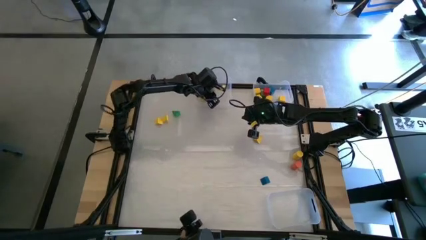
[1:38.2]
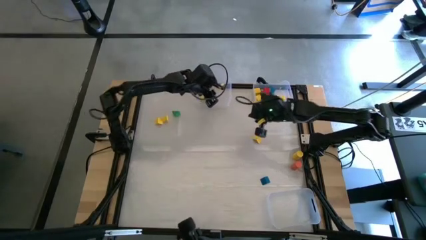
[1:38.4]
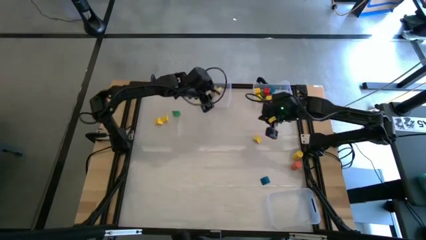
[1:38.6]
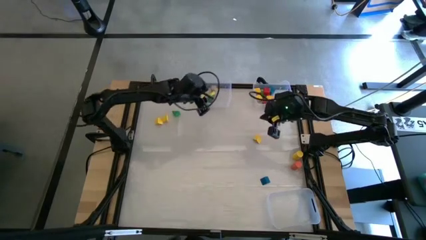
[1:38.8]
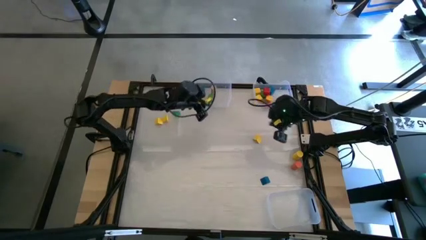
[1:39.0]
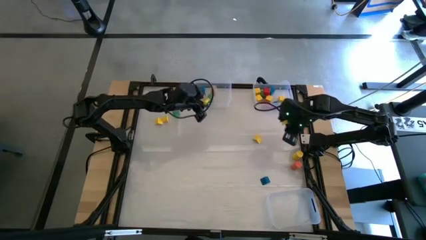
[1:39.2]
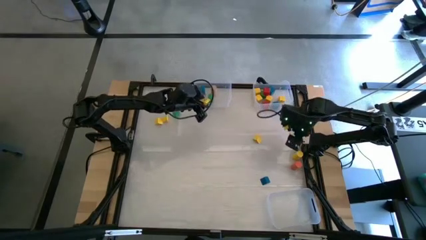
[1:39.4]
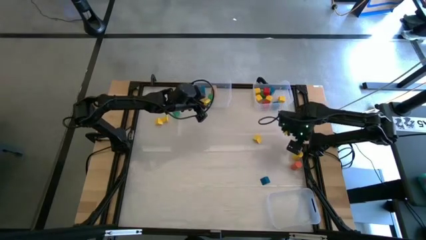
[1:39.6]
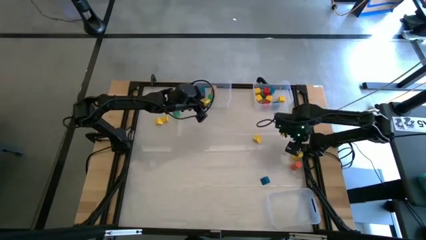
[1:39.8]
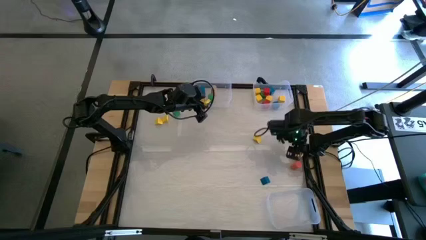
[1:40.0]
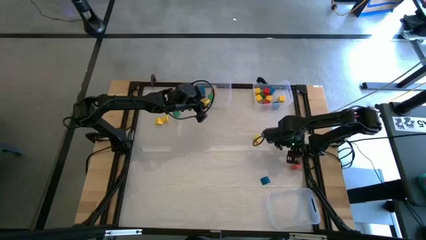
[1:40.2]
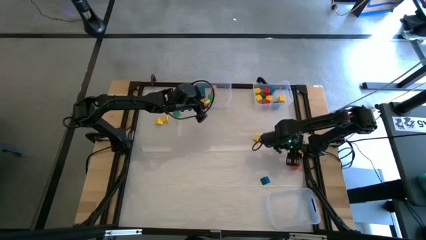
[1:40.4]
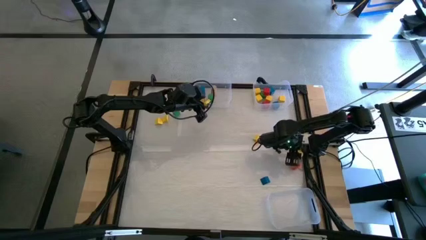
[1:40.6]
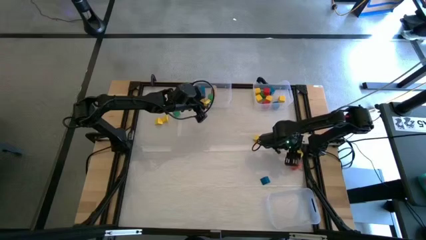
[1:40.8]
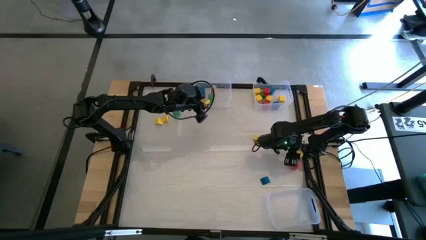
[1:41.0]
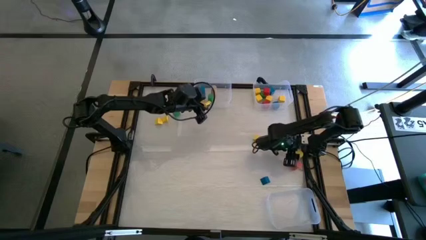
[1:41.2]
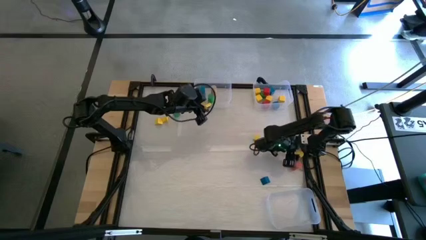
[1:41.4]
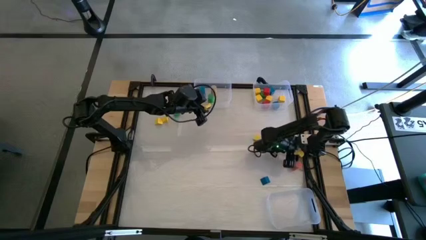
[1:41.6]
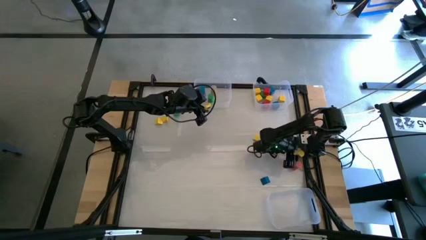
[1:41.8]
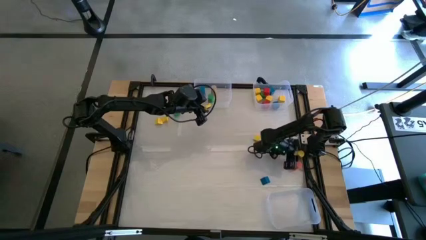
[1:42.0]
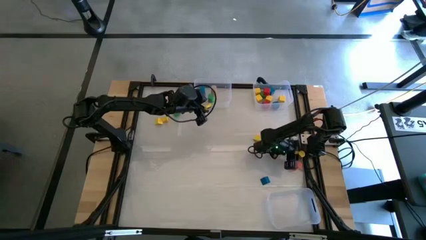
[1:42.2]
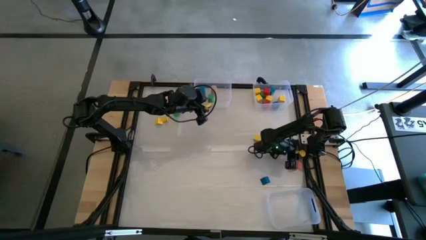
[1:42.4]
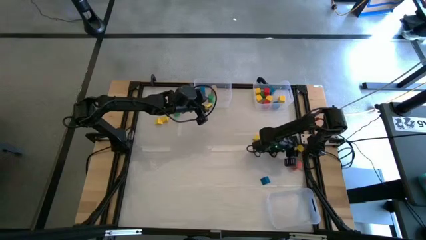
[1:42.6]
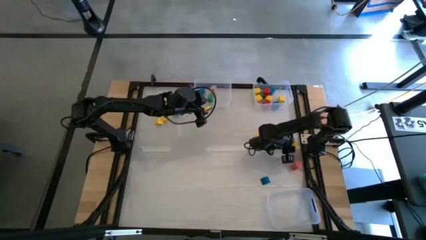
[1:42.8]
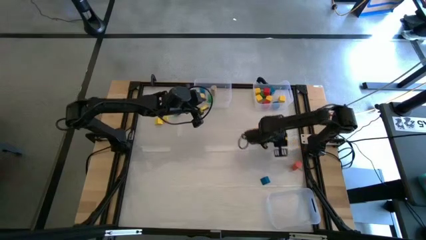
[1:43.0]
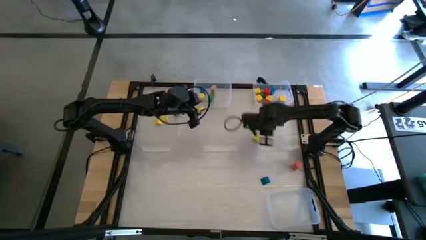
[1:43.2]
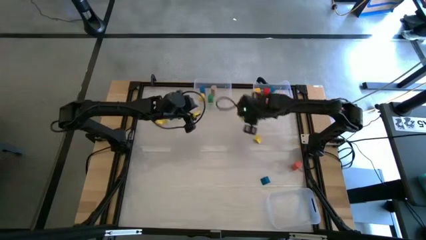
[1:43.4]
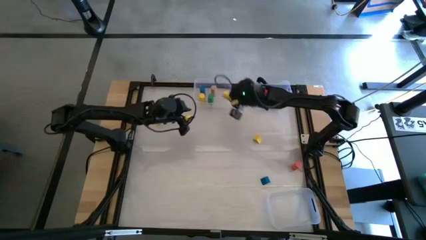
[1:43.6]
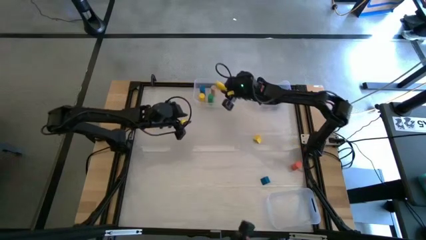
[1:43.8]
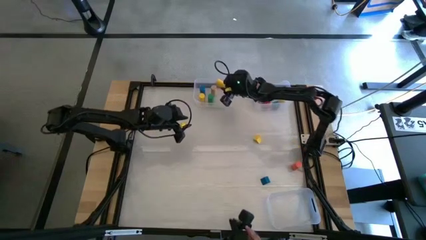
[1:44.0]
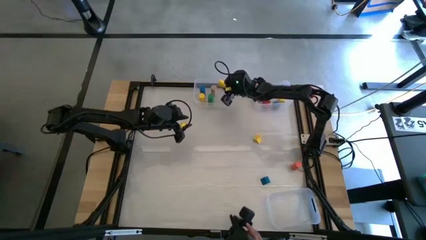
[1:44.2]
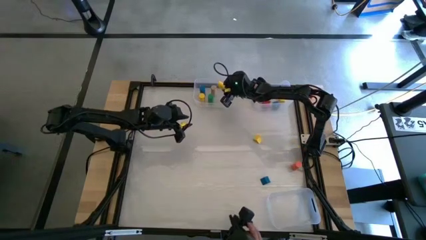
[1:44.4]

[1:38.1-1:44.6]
Task: Sort blocks by size
Put the yellow cylindrical block into the top left transparent bin

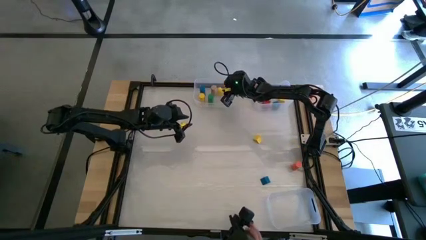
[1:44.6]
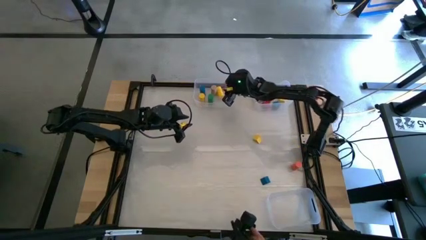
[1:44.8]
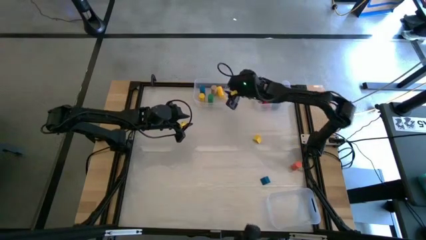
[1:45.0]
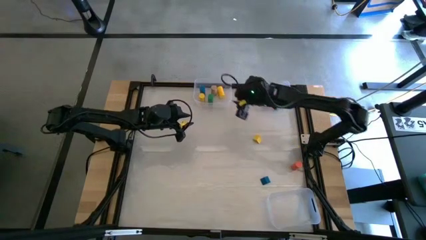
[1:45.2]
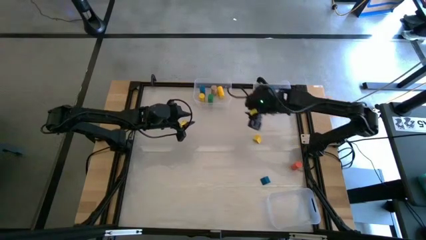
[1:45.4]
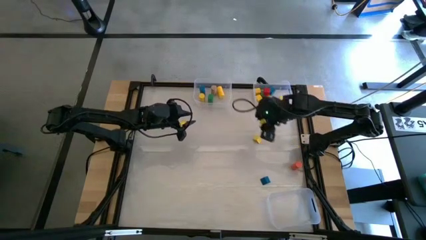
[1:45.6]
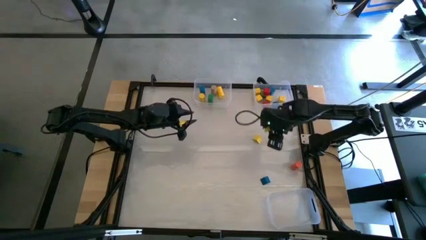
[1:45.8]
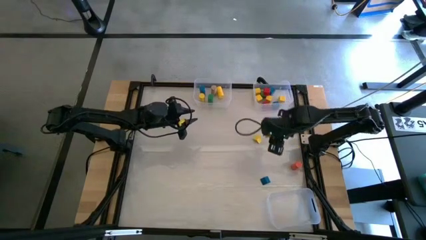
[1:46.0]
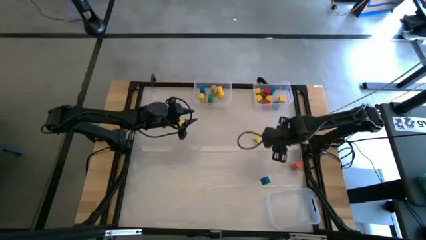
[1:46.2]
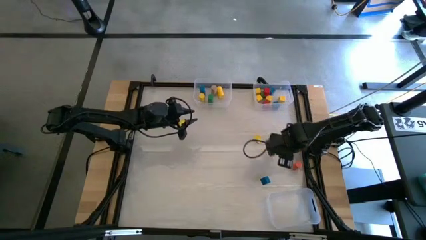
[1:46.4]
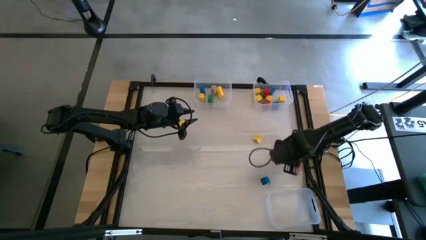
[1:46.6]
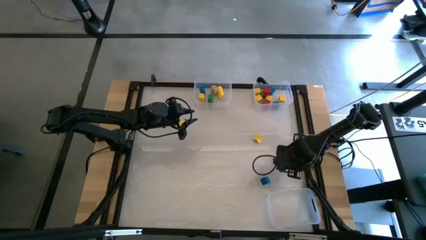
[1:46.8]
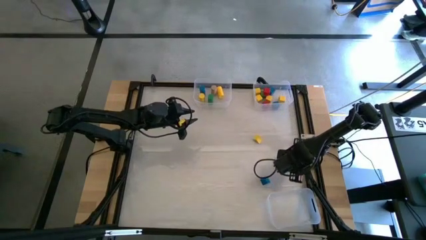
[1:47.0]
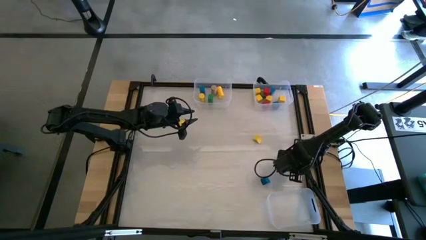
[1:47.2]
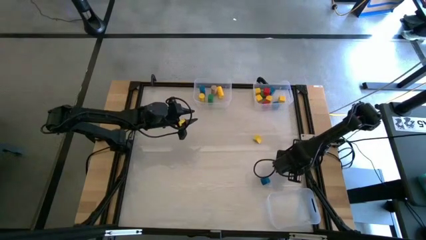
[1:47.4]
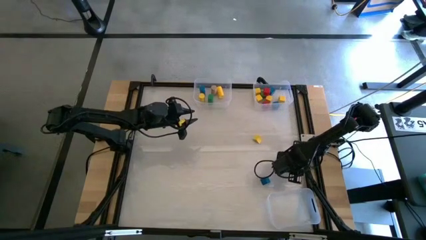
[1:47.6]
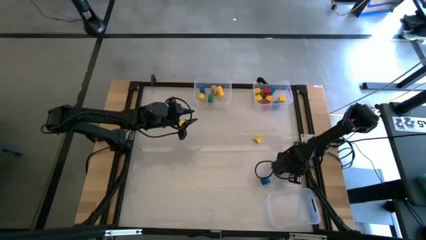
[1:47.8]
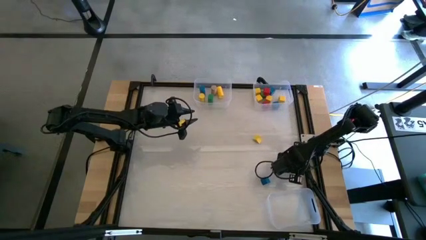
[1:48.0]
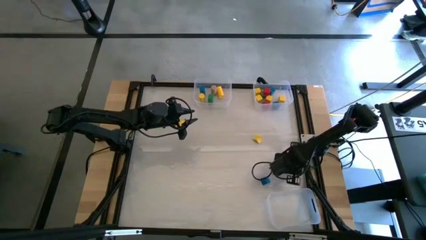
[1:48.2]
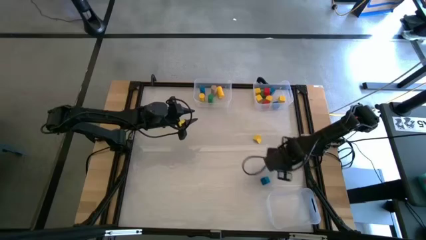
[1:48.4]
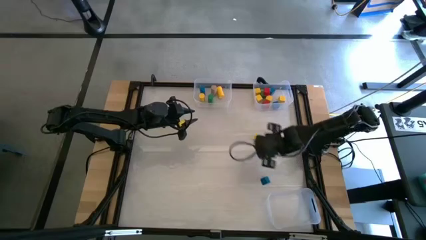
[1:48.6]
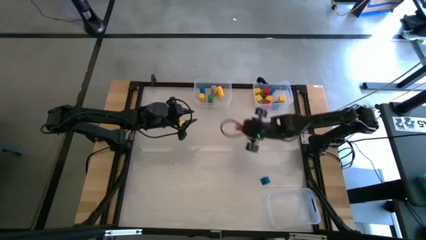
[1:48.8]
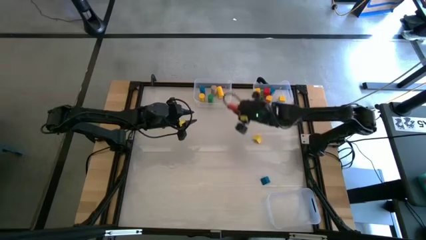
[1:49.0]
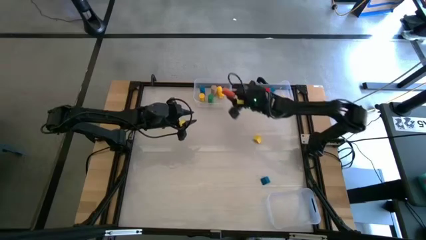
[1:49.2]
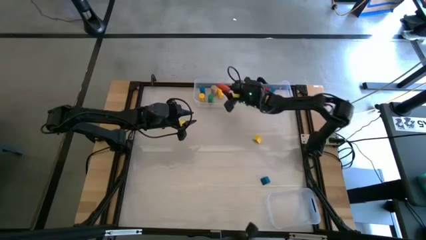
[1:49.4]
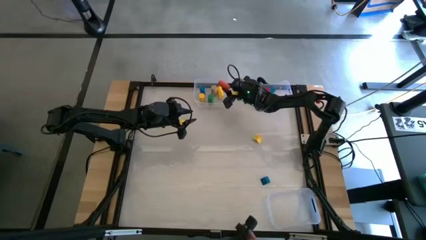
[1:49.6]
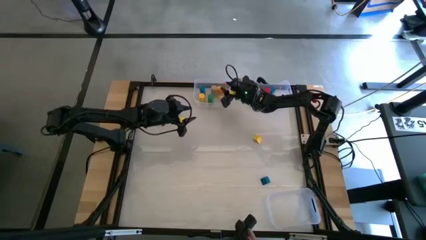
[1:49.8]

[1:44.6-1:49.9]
Put the orange cylindrical block into the top left transparent bin

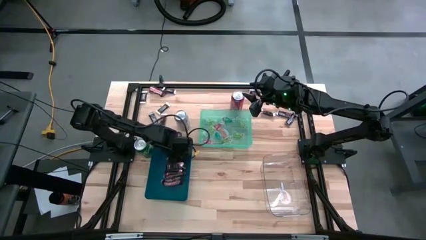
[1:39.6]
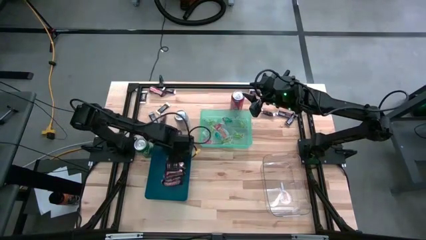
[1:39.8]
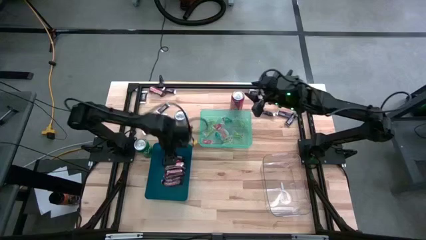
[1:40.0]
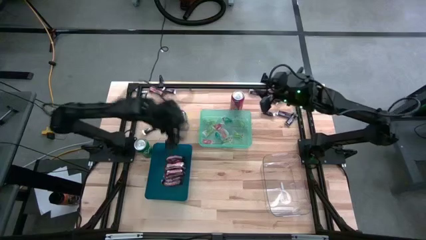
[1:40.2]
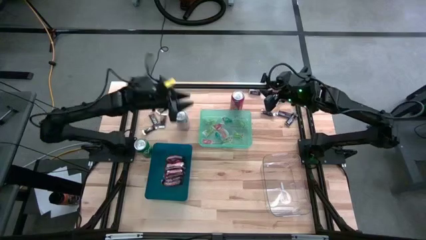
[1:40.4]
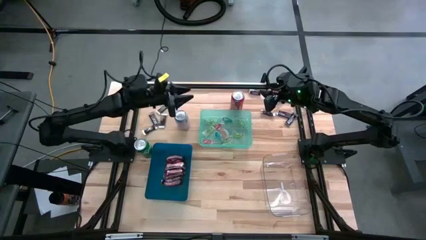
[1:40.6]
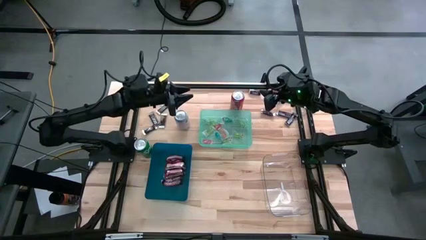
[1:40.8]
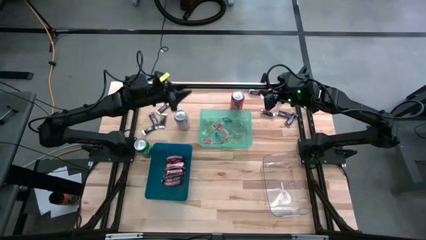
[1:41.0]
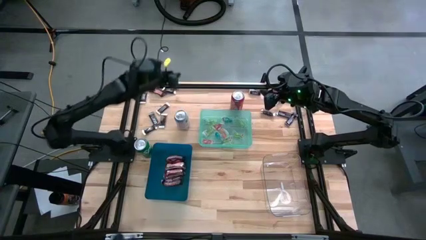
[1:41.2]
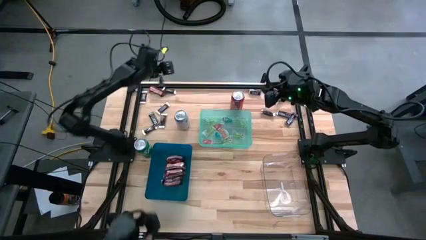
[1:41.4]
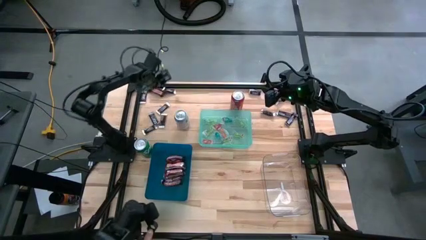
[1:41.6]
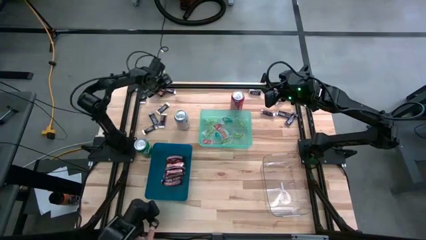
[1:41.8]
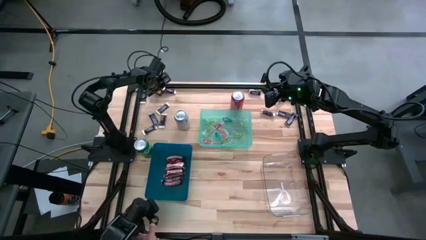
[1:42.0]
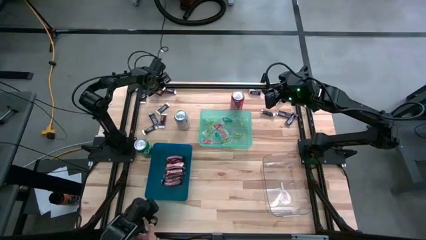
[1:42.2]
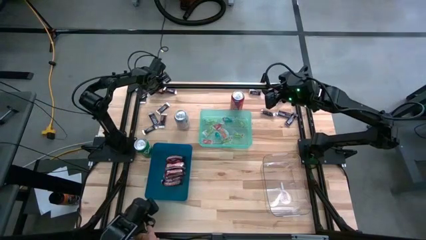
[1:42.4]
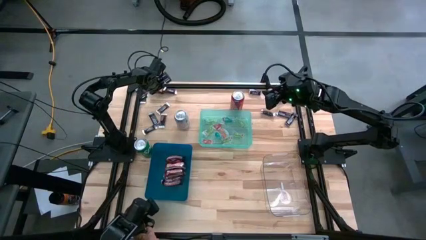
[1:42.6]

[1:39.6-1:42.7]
Task: Organize candy in baskets
Put the brown red chocolate into the blue bin
